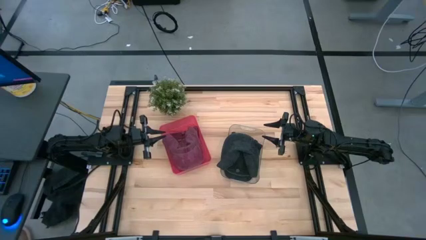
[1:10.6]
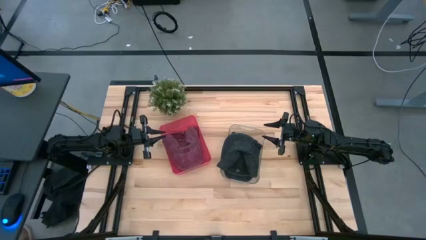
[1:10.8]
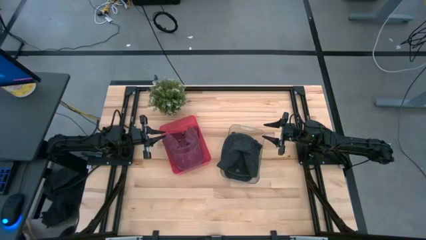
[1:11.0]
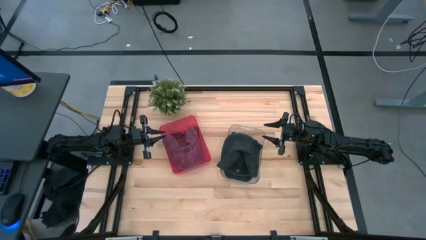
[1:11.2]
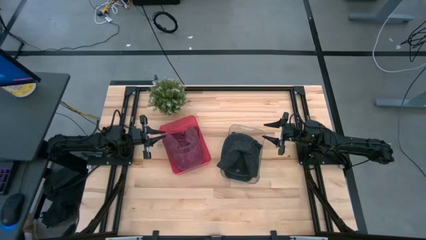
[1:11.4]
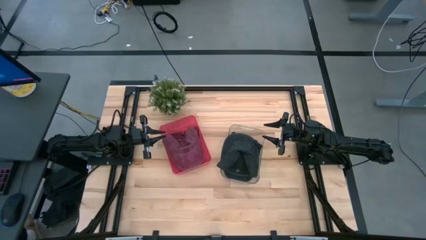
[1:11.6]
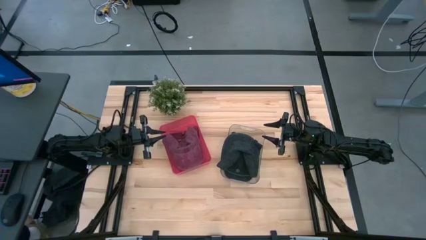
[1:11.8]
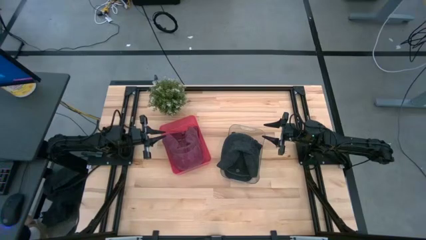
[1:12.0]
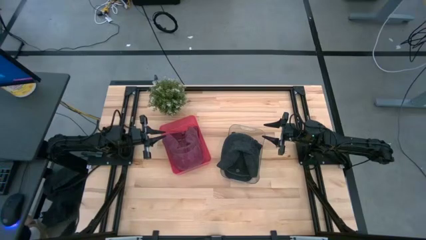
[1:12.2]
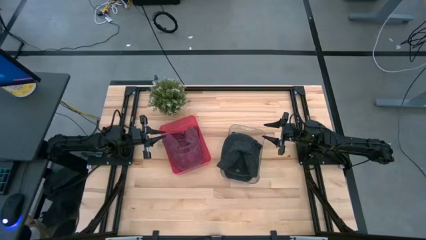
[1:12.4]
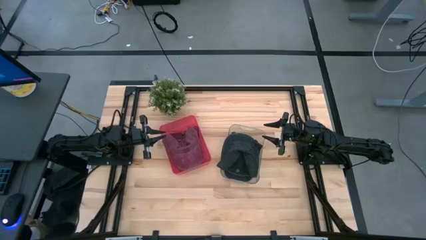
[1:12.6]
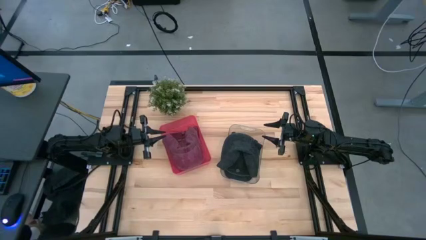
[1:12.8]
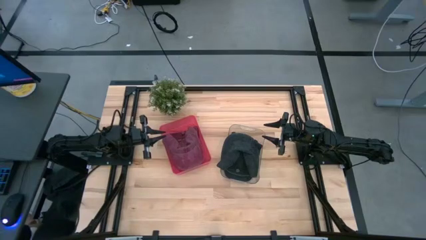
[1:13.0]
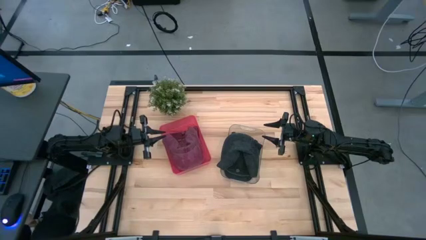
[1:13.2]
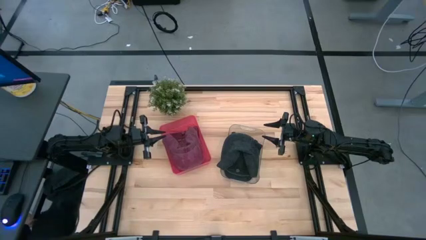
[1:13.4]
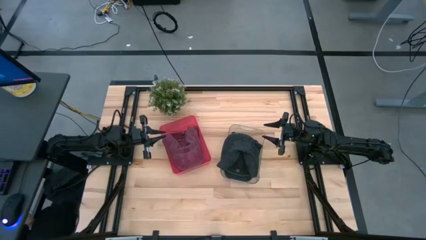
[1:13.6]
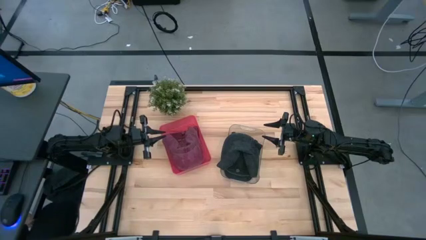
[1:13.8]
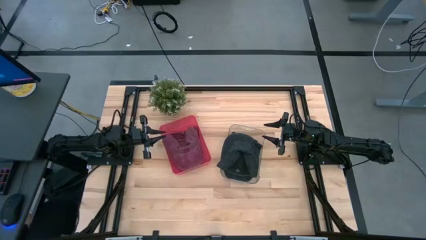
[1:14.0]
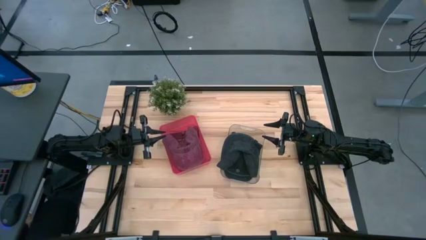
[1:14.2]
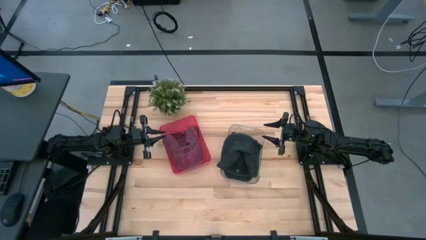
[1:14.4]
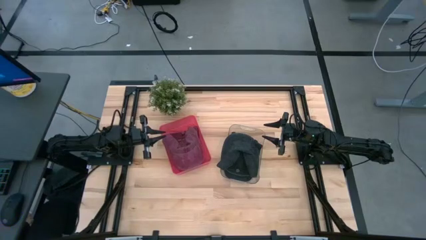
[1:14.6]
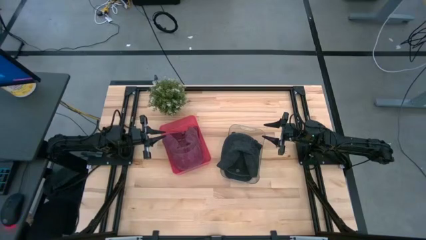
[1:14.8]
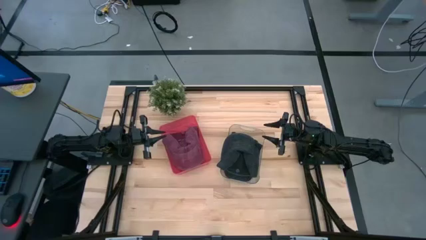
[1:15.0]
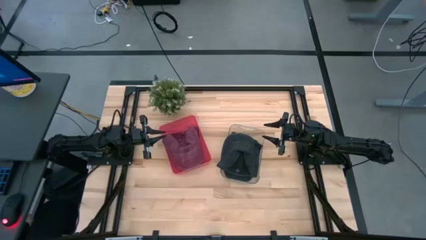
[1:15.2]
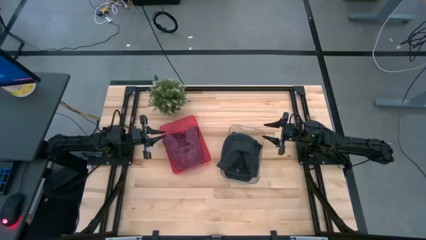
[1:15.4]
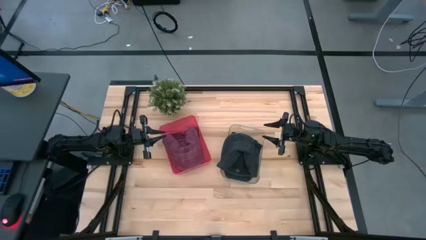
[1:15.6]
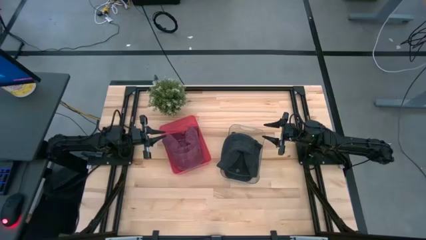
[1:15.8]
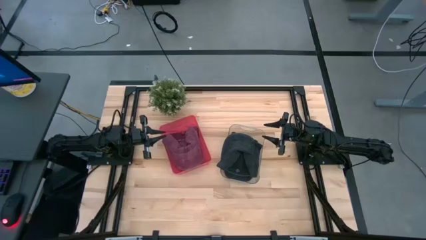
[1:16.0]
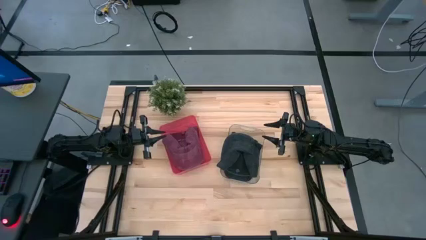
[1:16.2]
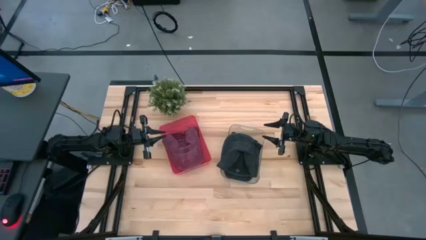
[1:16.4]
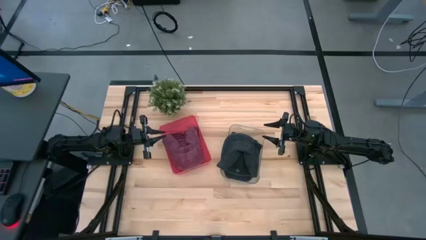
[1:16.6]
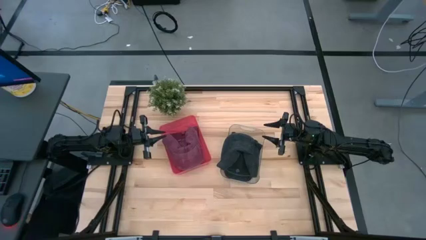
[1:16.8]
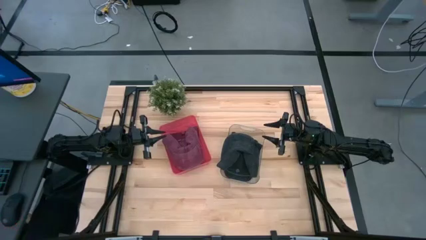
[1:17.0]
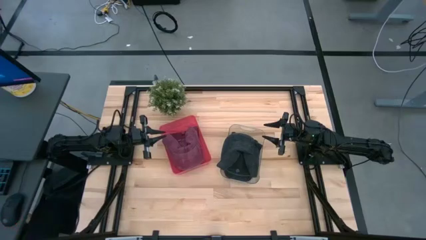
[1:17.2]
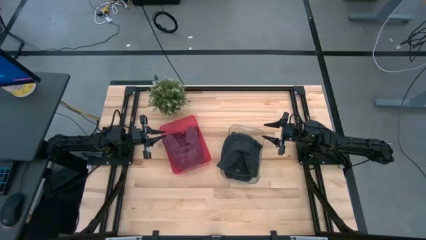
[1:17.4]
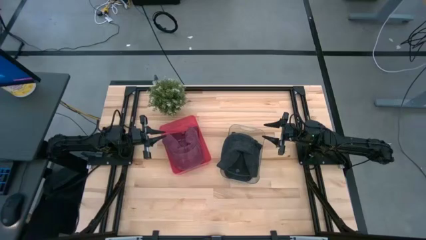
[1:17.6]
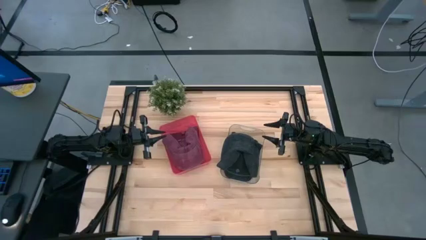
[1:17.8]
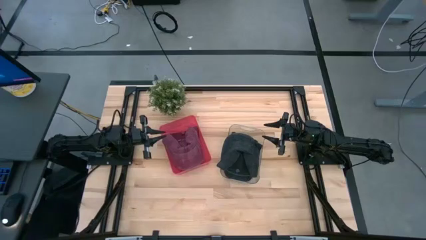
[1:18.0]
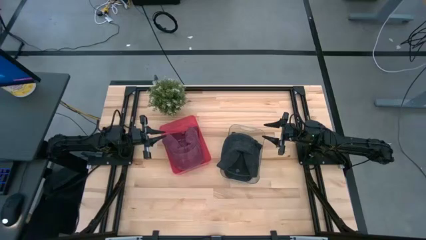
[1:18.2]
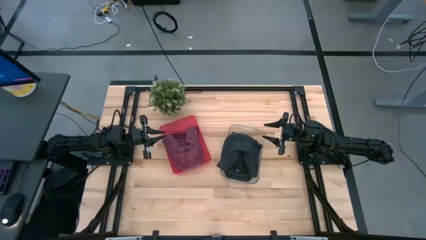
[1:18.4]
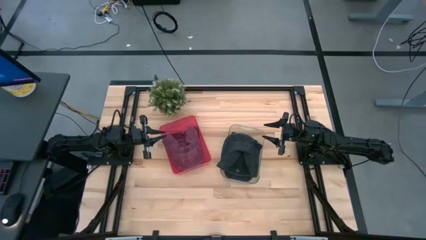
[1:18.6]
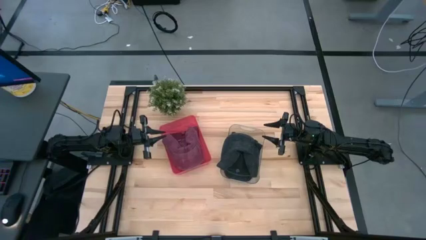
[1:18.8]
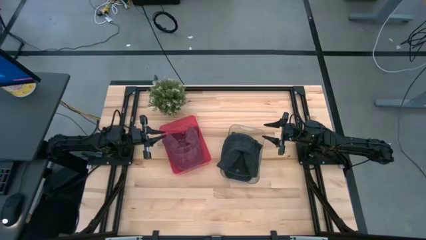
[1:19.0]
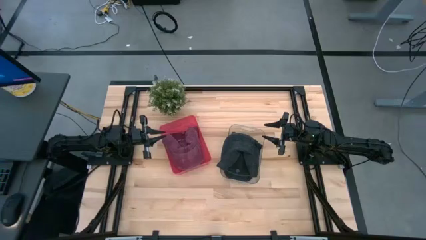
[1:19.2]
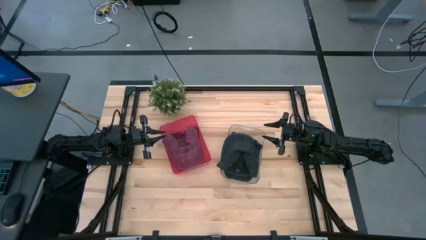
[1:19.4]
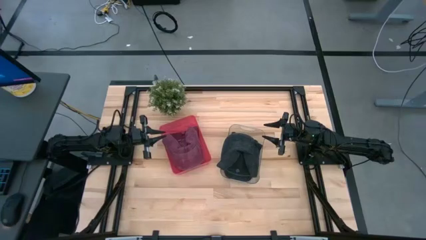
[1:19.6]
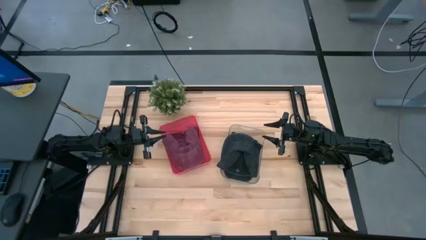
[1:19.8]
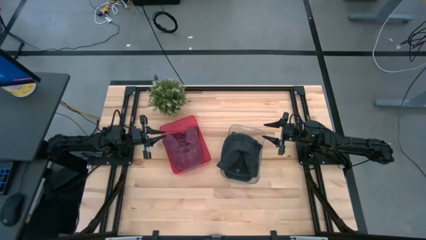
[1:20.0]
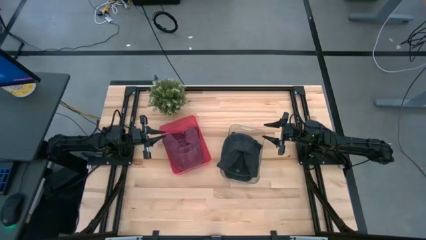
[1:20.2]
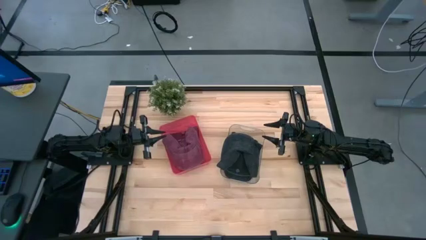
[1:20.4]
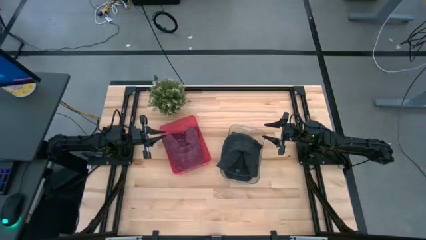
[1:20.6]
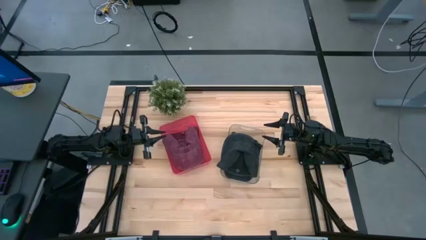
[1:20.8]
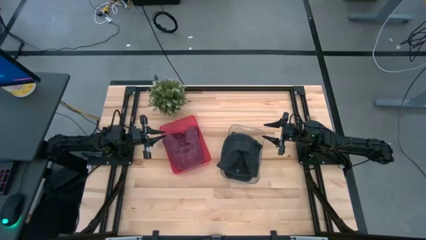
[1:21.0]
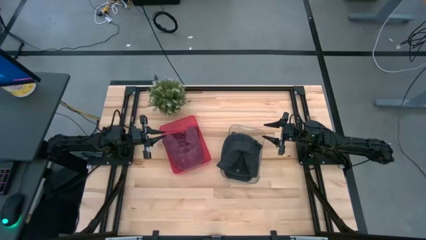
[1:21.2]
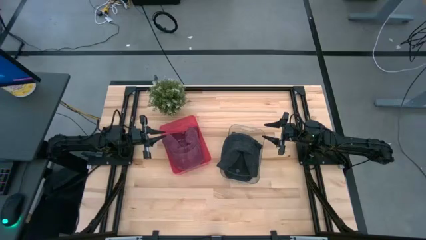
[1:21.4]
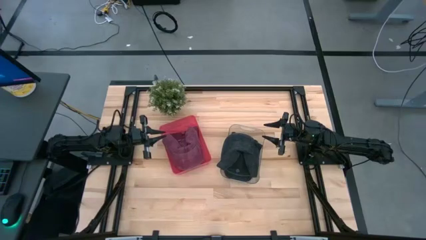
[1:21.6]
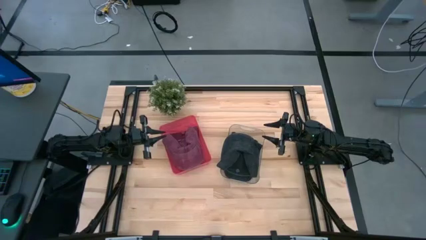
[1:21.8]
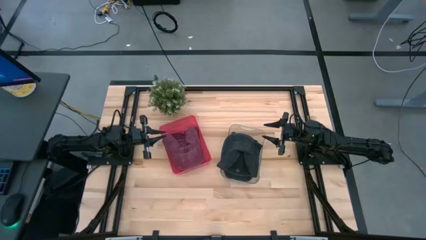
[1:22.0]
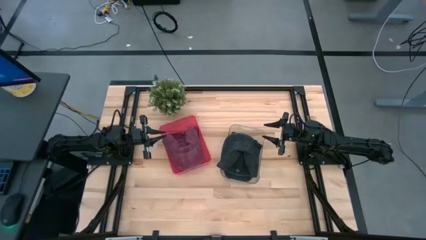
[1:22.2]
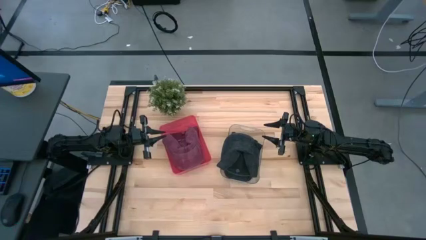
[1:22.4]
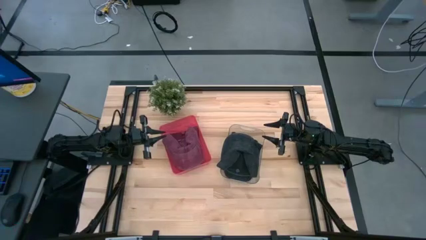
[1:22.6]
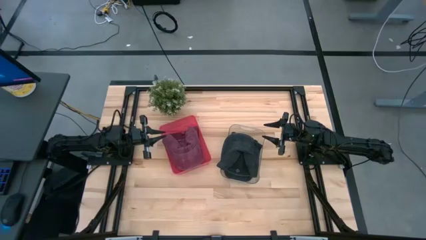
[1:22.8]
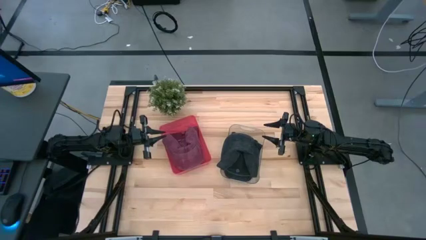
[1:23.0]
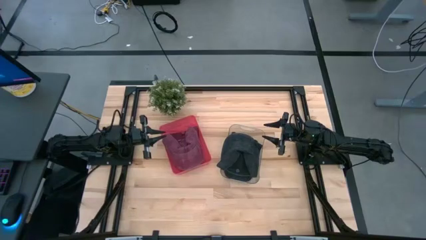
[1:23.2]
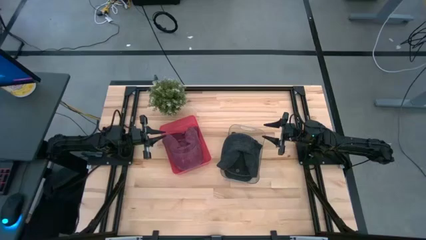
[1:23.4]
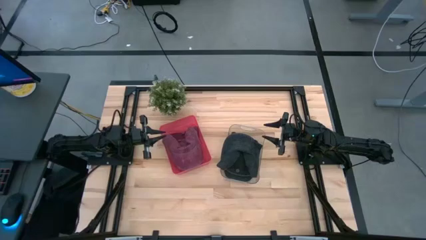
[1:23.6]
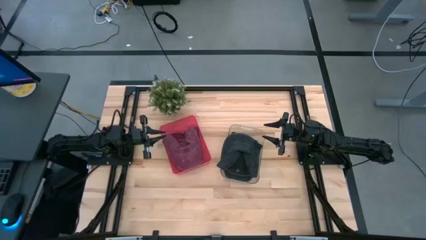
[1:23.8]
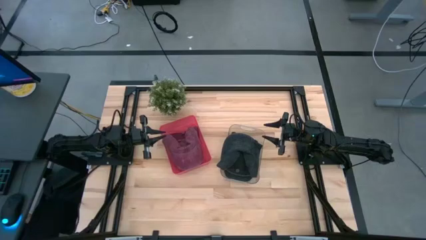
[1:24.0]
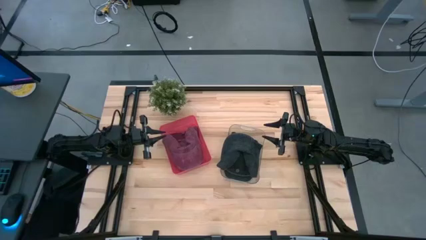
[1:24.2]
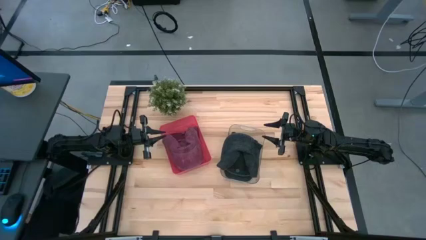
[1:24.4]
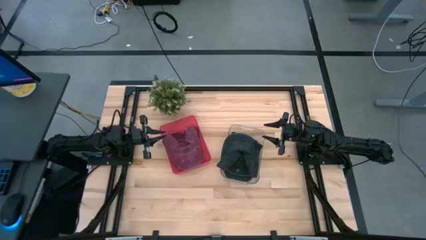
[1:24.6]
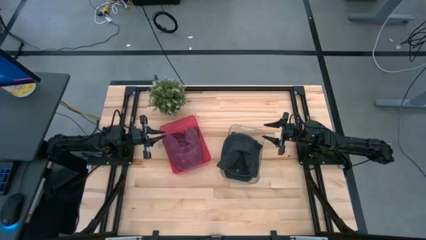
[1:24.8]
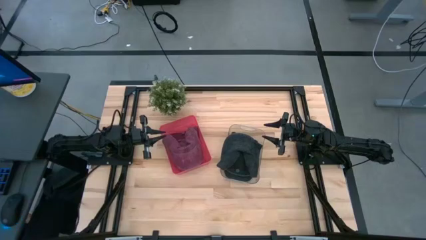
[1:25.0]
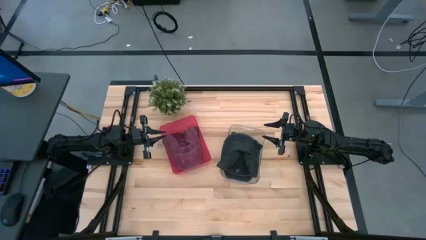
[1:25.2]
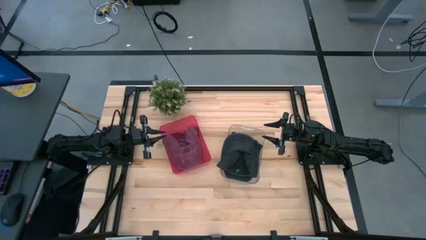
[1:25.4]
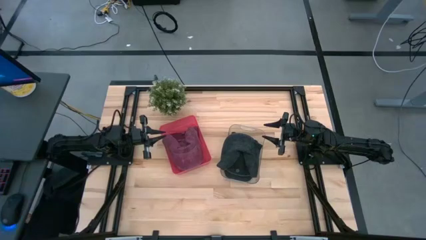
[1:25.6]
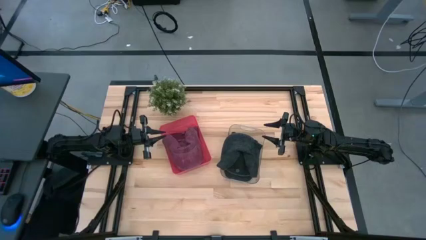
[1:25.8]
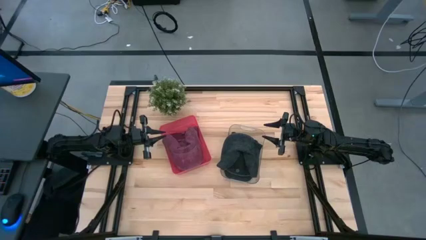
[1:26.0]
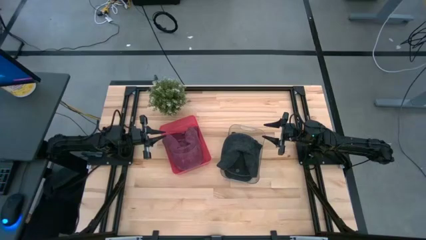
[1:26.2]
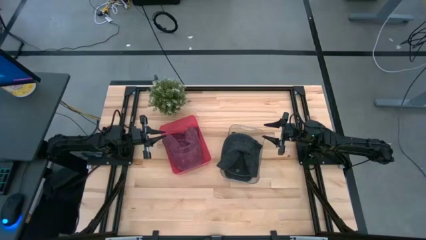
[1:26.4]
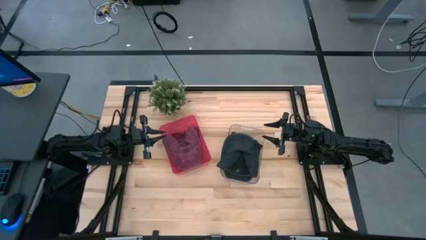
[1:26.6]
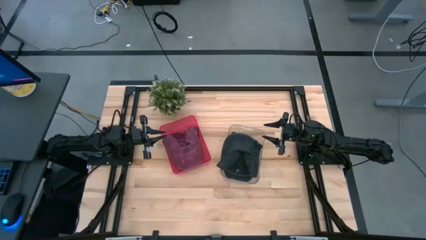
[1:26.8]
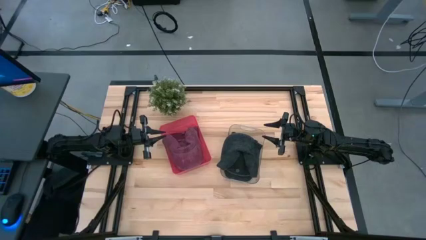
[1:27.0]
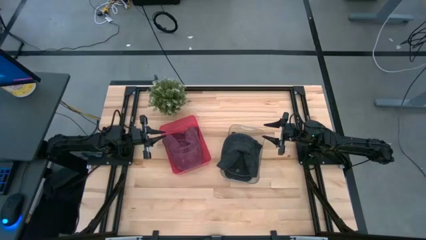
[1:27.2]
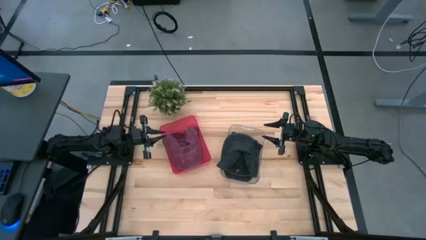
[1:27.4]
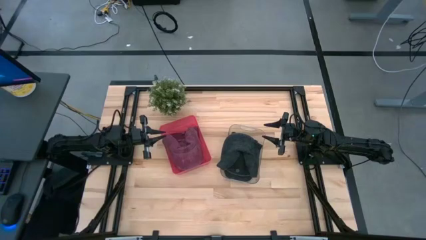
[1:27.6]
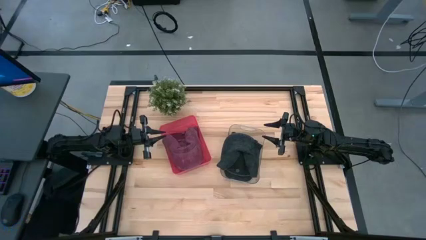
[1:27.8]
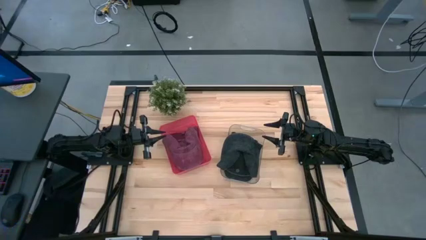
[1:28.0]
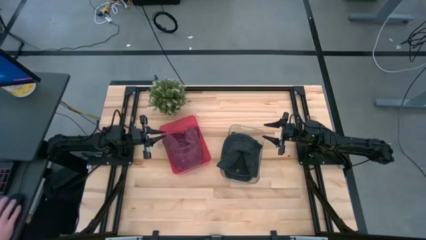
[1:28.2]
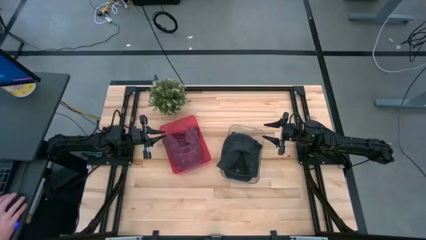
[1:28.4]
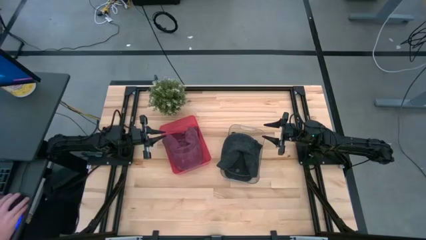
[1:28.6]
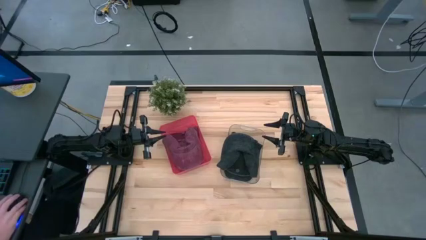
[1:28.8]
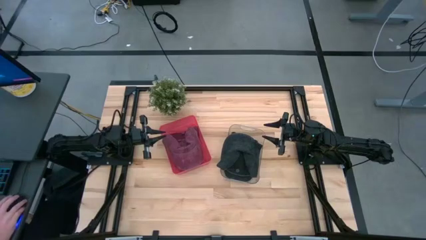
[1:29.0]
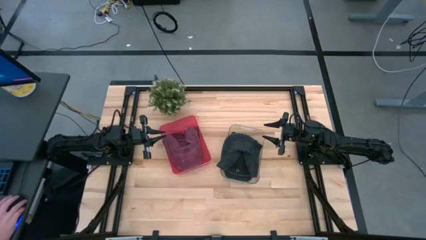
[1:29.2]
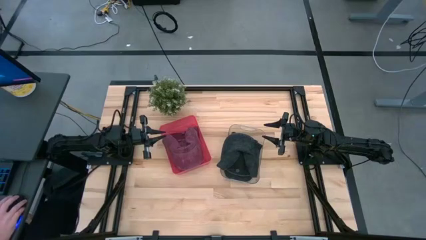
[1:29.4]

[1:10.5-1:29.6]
Task: Pick & Place hat
Return to home position
